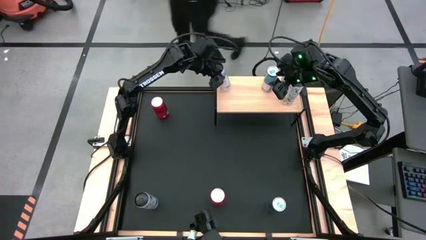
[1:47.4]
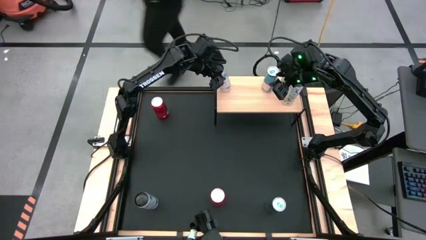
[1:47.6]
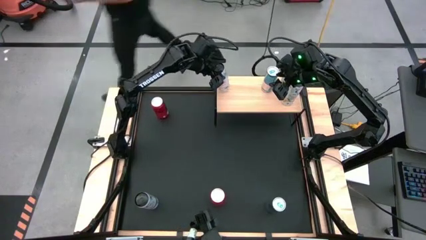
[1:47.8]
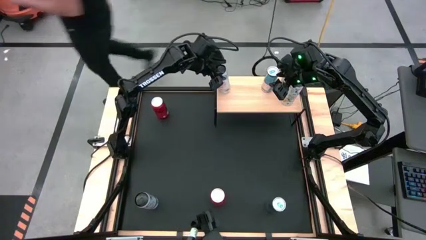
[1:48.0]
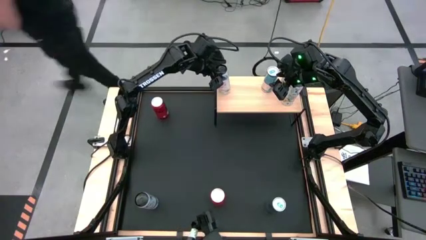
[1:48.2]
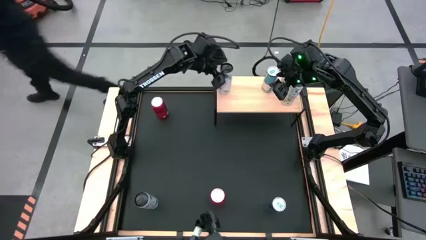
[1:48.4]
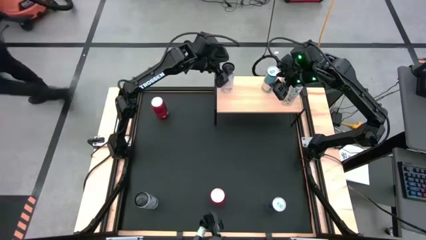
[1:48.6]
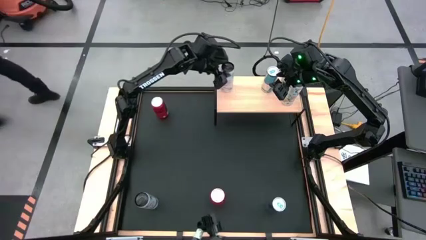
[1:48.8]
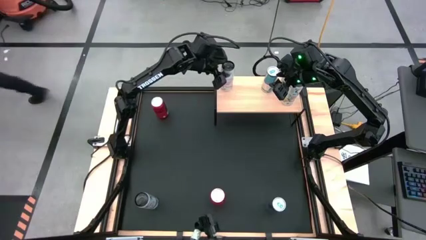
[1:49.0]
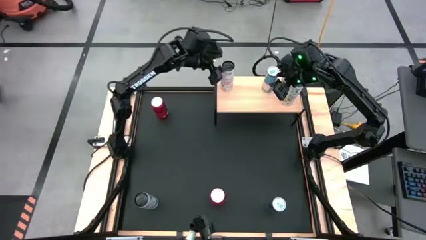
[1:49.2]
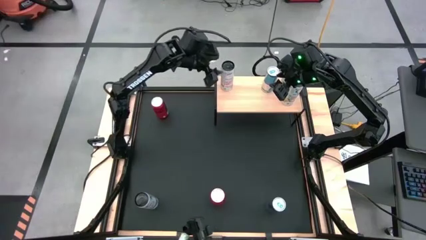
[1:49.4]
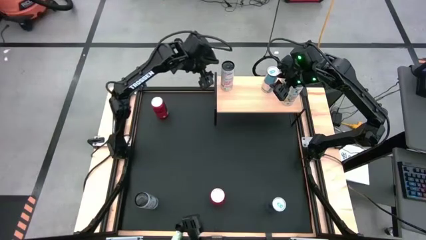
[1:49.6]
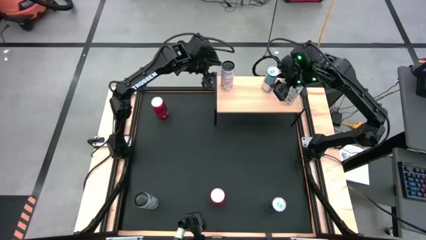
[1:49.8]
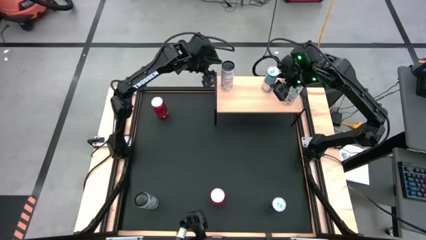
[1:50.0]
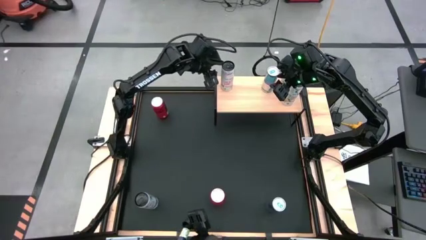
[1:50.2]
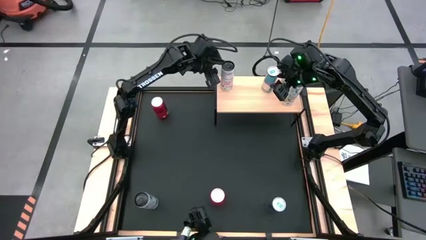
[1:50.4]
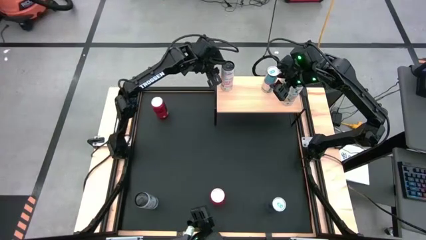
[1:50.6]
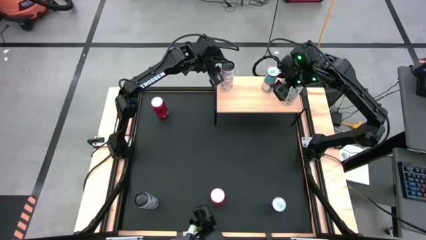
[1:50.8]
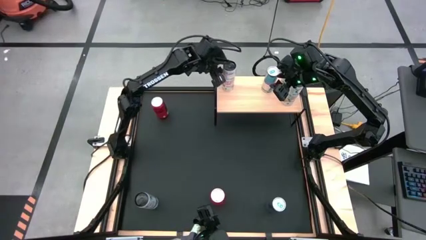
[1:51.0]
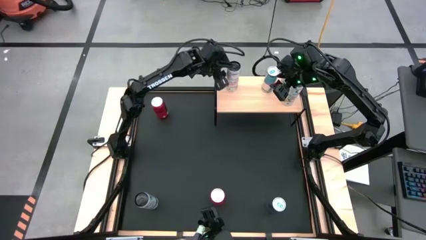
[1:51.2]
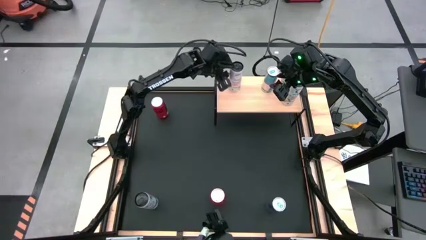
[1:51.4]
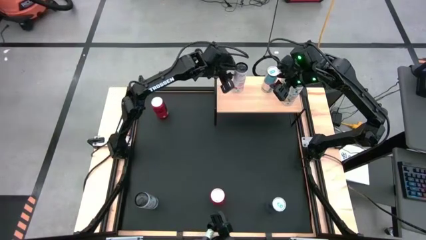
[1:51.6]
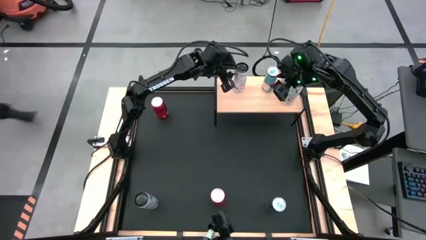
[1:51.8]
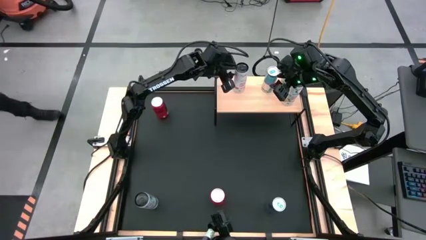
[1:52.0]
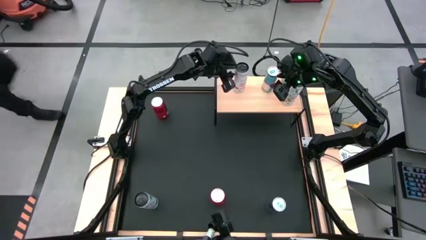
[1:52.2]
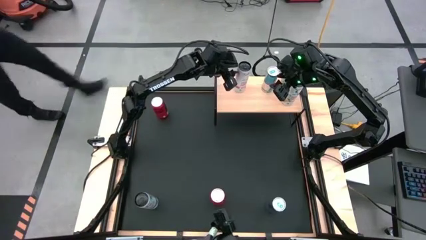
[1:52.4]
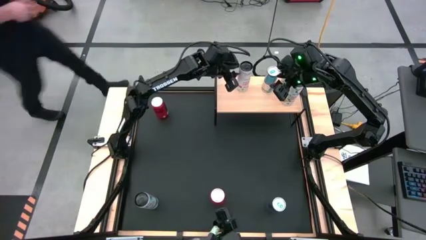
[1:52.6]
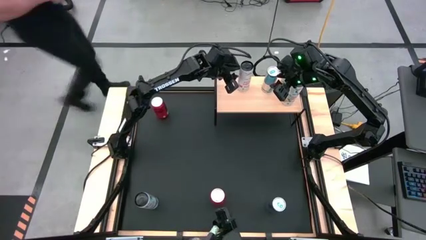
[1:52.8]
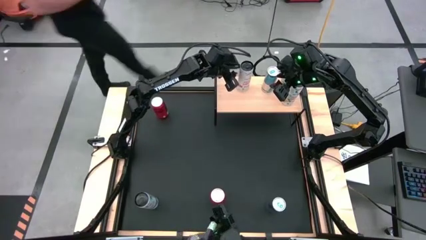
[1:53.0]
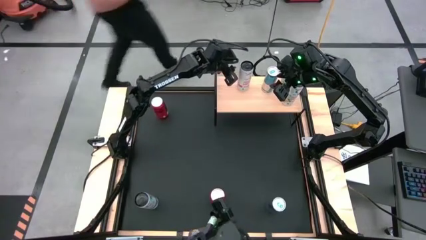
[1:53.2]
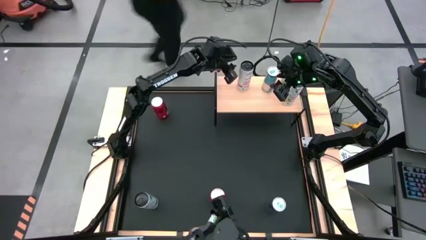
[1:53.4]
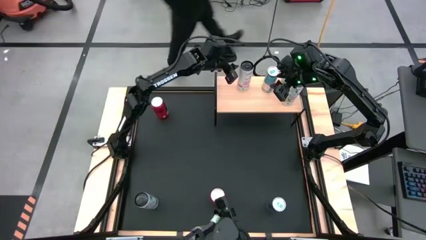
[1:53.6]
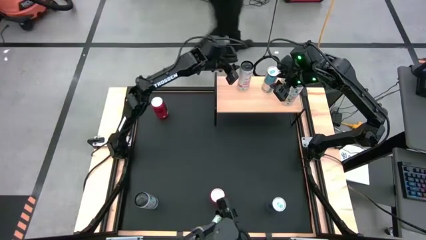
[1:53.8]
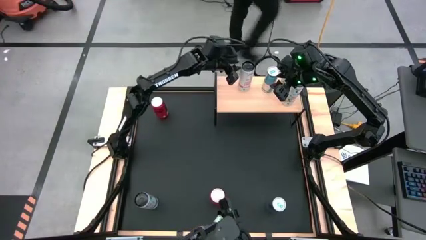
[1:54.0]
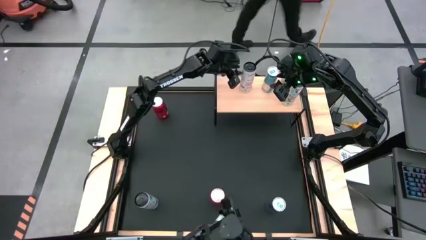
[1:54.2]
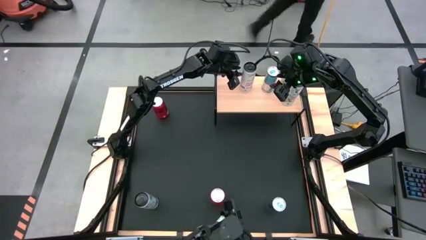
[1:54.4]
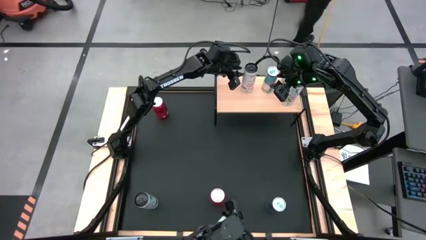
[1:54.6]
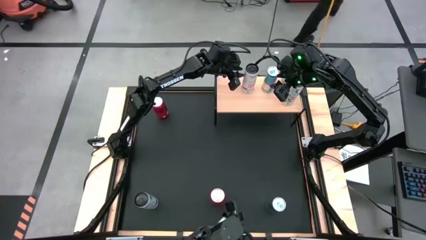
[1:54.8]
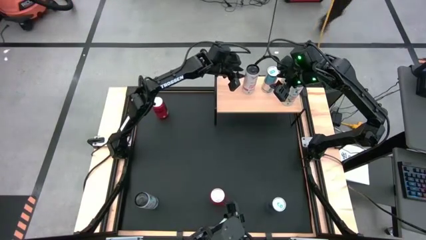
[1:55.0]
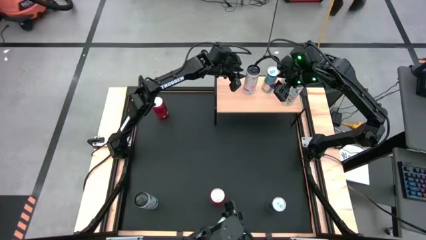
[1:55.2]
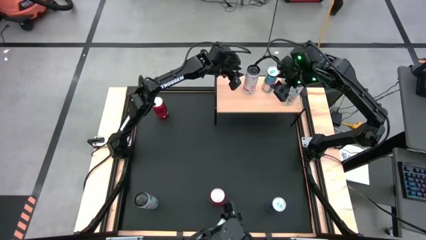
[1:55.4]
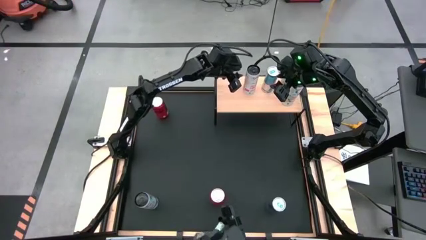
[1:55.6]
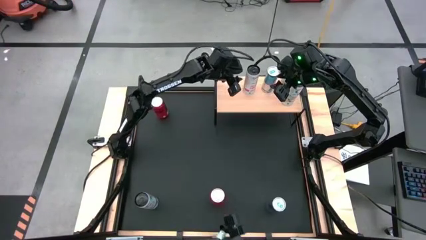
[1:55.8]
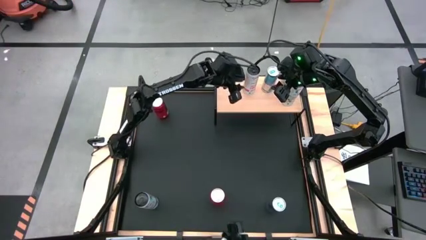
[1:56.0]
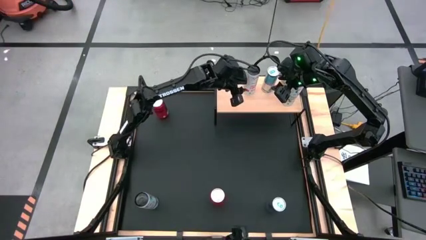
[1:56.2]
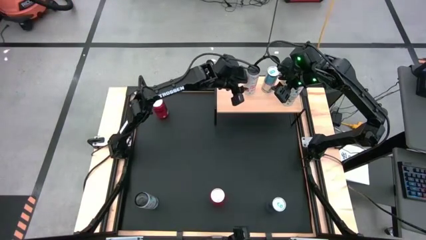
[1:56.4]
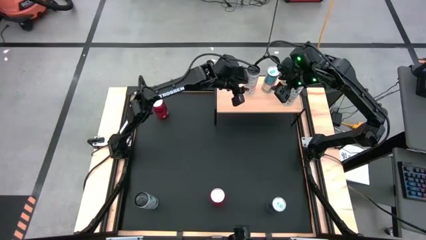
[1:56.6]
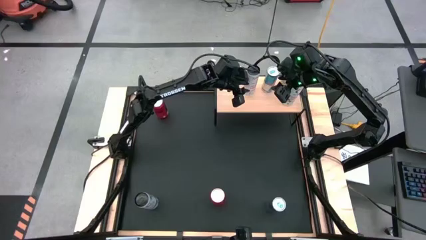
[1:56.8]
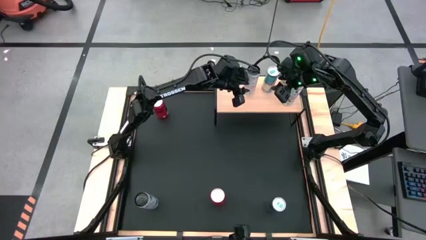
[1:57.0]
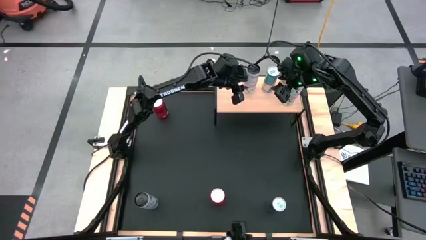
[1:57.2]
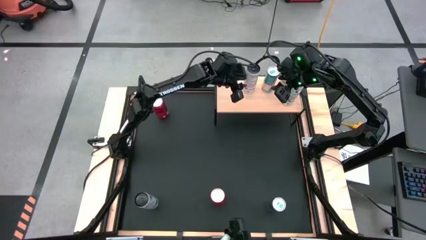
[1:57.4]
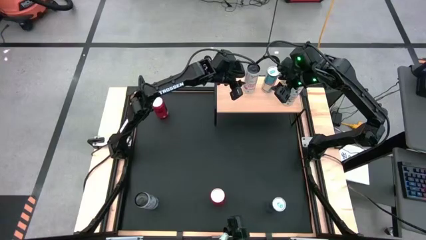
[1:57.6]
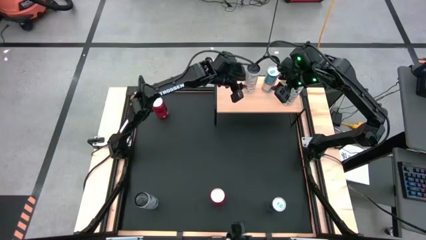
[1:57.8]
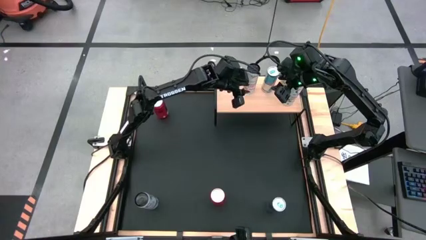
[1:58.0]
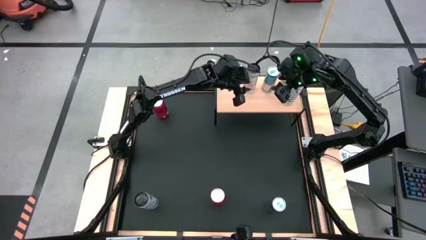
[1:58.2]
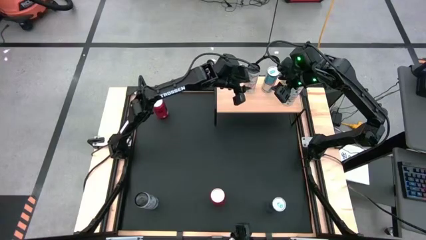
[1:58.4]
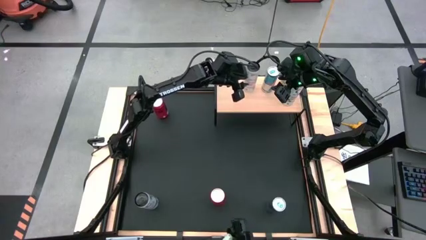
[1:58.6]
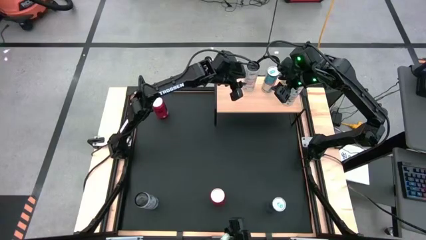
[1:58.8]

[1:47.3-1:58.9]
Task: Place canned beverage on shelf
Put the top white-pink soda can on the shelf
